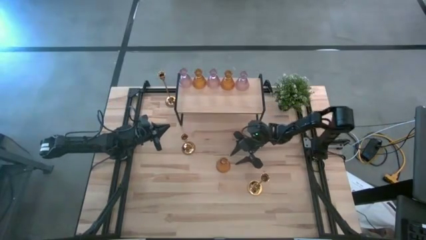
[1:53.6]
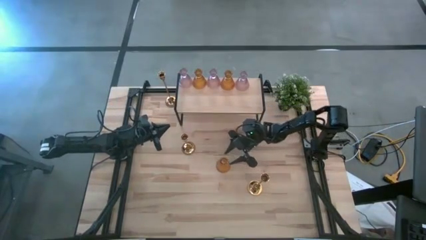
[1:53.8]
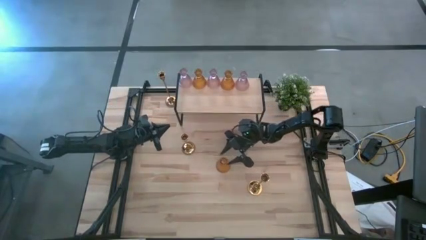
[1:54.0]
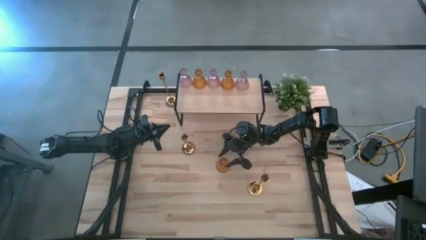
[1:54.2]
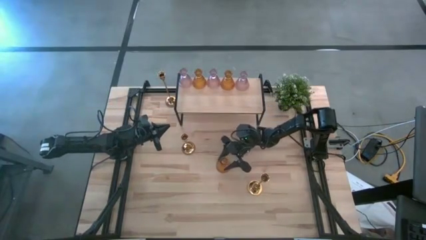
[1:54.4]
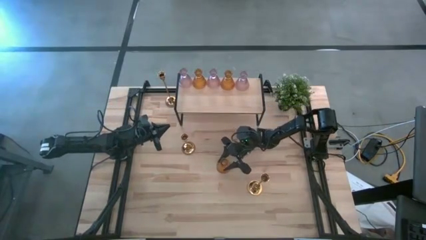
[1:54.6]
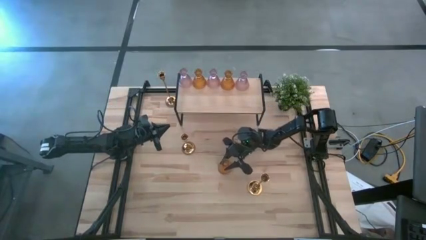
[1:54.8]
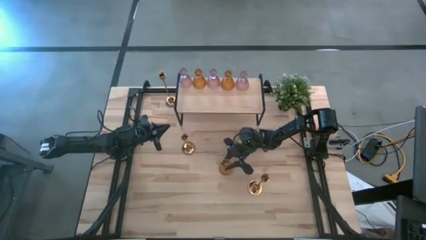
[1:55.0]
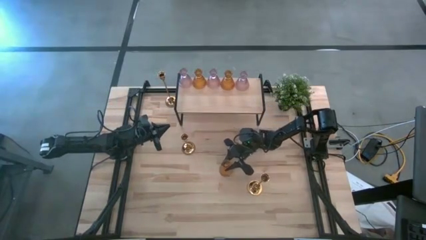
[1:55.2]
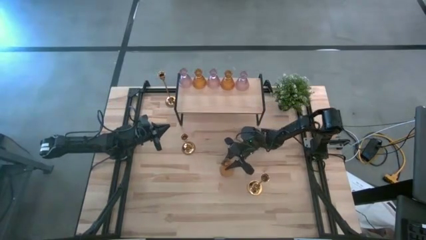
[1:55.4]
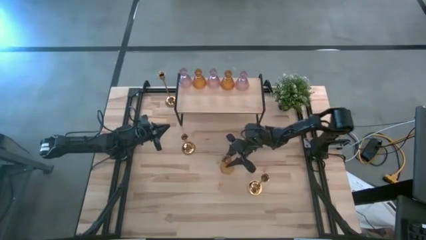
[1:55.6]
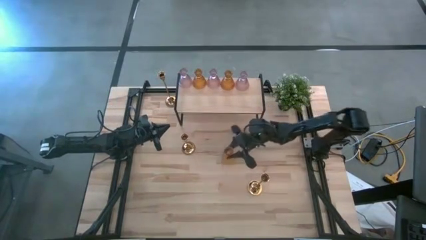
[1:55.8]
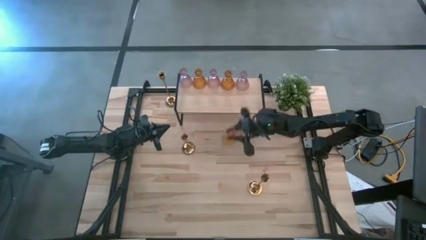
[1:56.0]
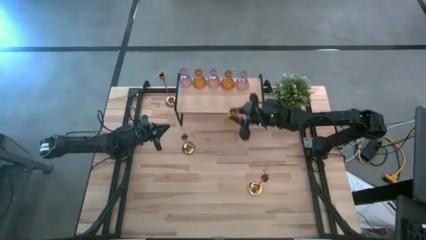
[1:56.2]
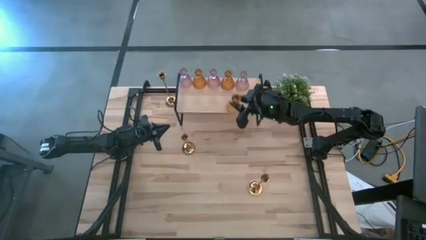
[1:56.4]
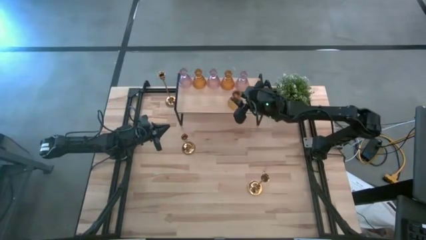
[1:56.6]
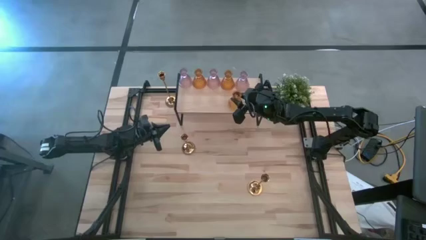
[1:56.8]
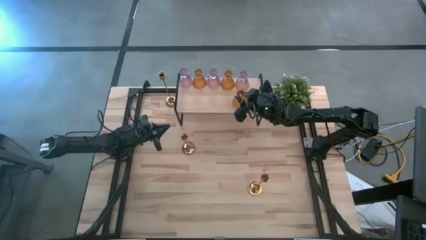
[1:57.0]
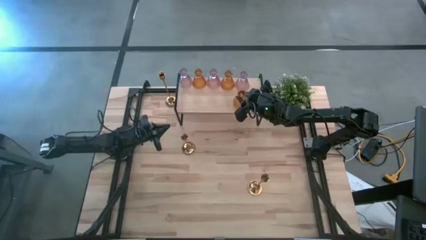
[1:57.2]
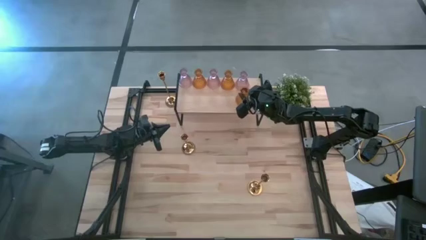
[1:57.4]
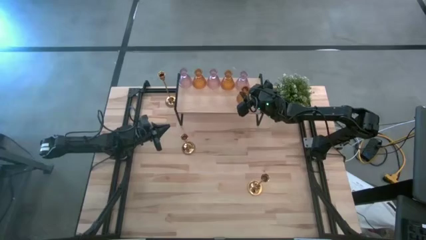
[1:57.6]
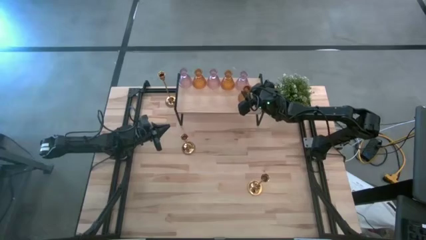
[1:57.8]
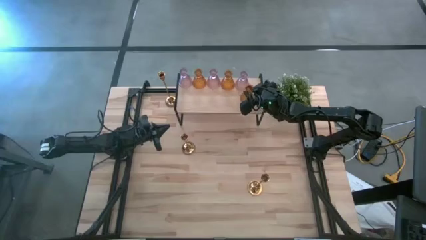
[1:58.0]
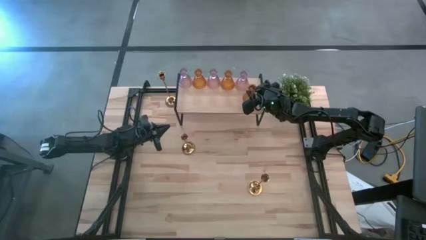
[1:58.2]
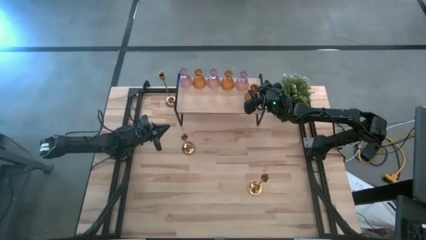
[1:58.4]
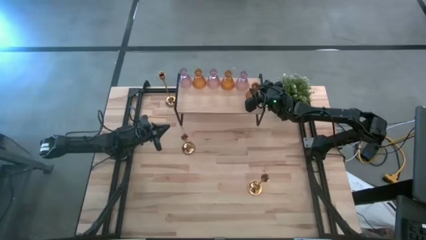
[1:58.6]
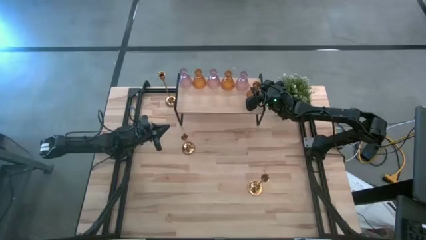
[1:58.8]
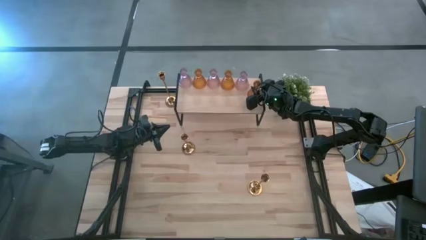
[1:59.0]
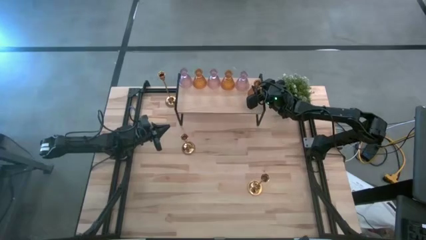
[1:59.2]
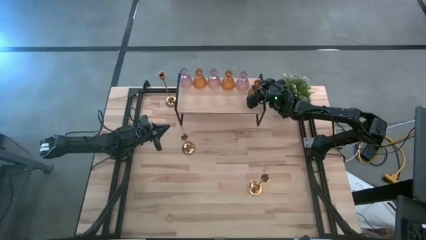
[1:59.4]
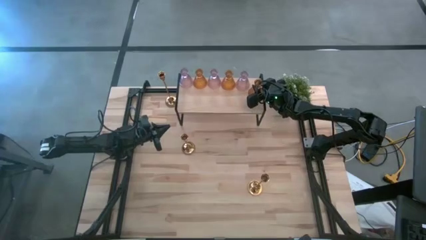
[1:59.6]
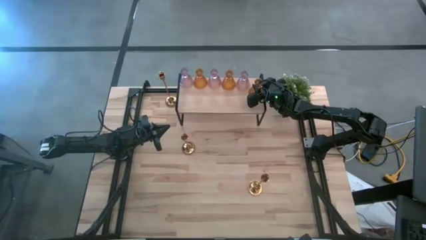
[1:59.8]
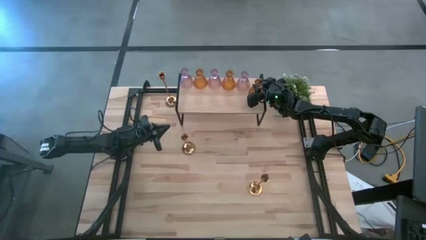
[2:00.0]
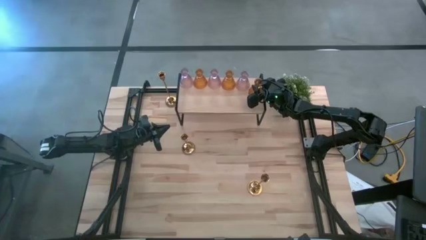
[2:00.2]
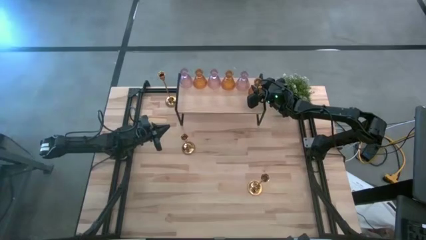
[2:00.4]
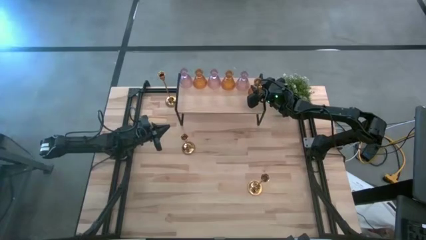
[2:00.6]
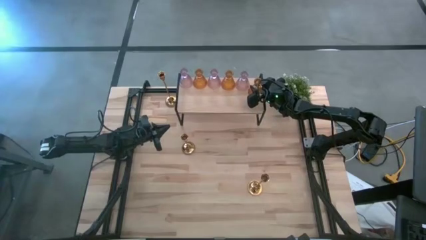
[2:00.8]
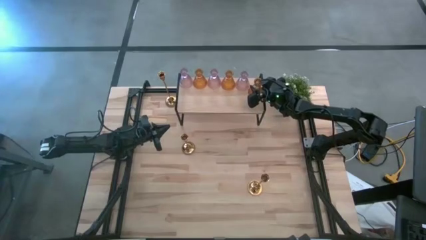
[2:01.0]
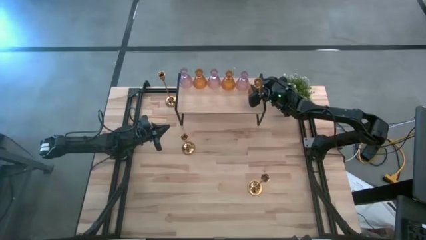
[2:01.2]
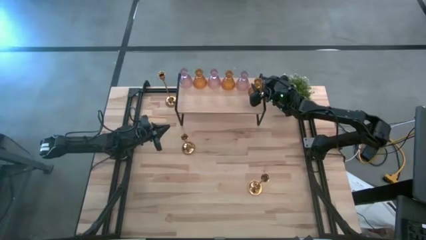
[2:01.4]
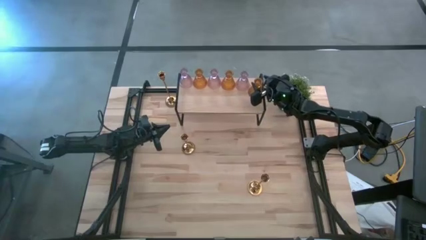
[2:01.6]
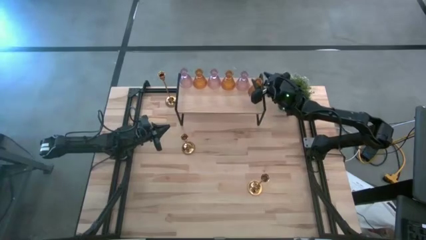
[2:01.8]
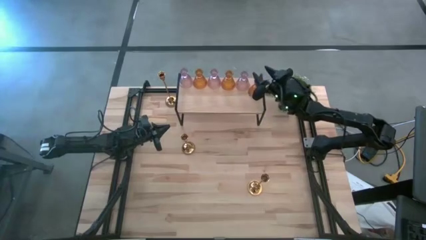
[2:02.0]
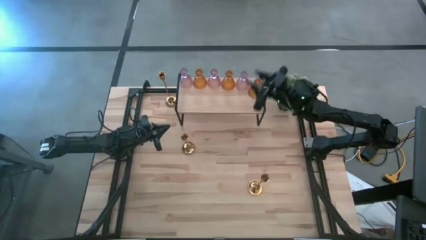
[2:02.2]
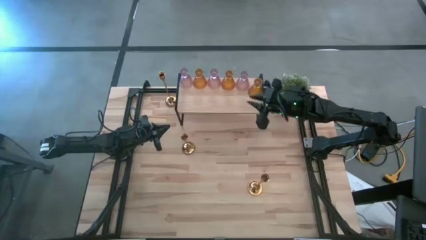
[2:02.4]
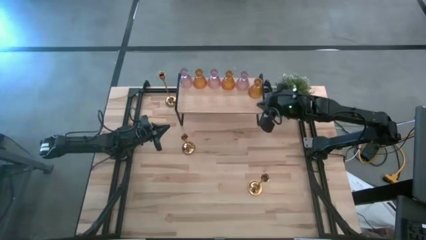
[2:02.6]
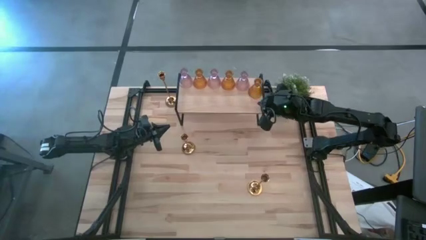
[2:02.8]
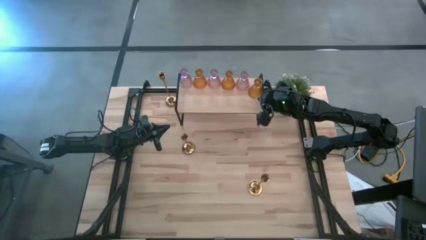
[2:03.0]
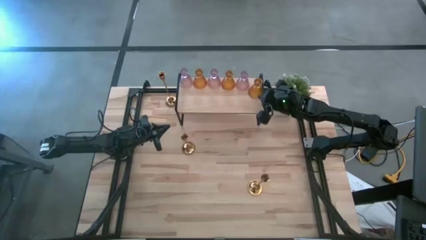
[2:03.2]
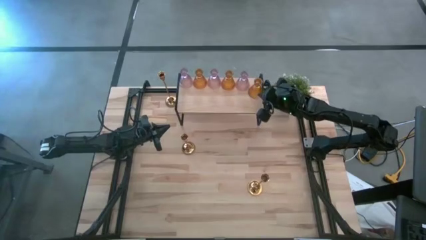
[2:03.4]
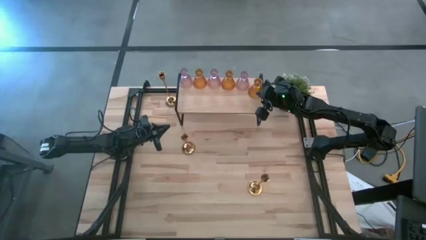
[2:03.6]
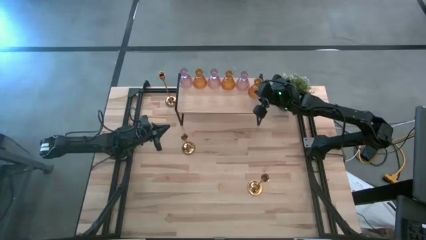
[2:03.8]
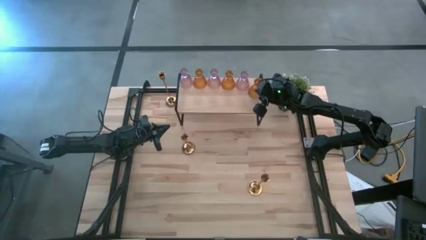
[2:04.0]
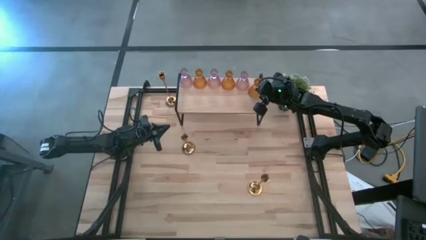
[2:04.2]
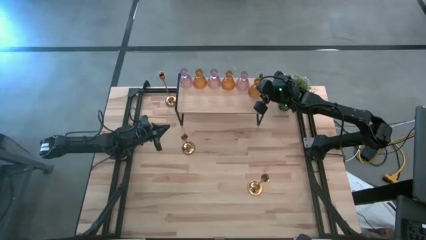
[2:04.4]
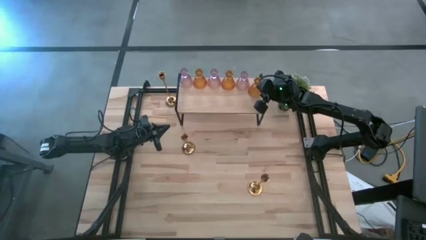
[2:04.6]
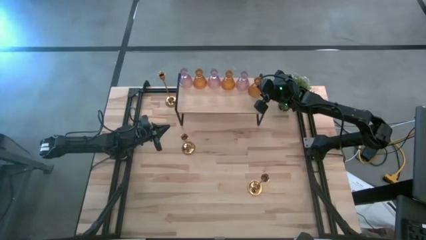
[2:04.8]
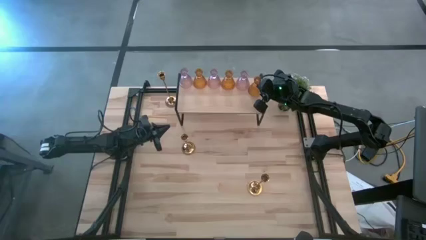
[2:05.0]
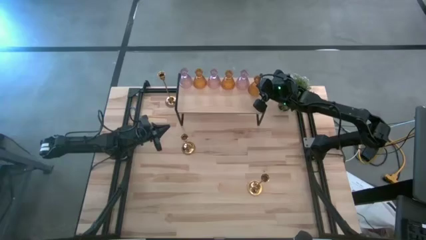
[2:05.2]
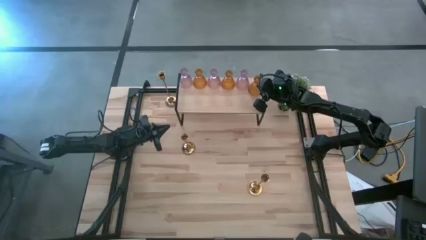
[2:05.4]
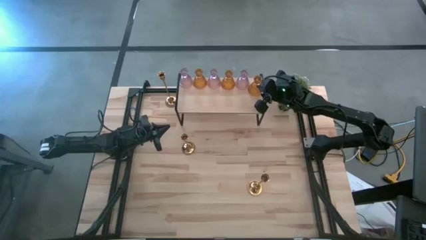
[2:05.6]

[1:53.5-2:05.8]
Task: Pick & Place candle stick holders
Put the yellow glass candle holder on the shelf aligned with the other glass candle holders

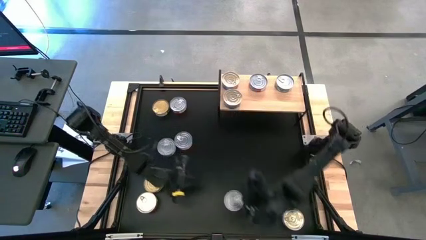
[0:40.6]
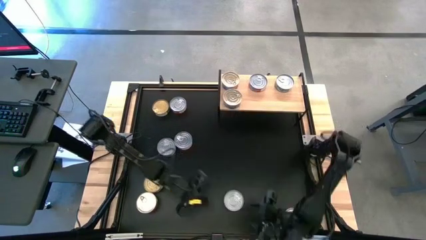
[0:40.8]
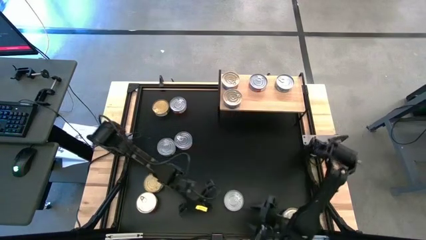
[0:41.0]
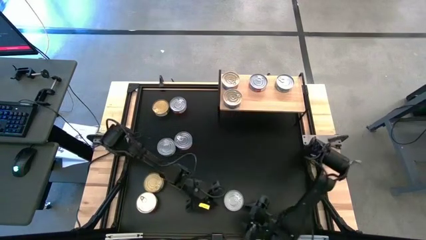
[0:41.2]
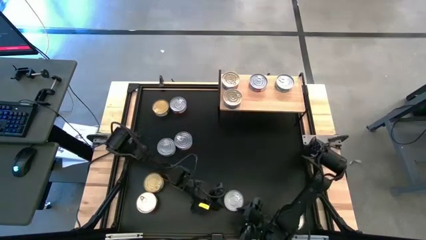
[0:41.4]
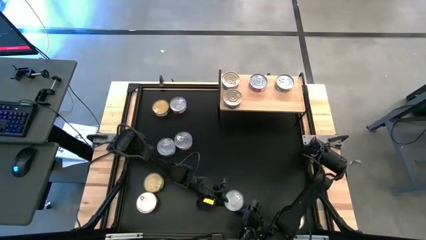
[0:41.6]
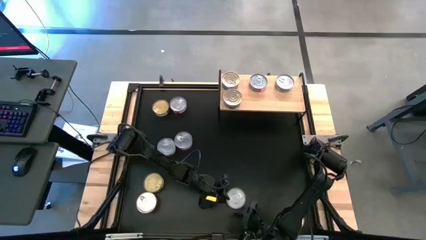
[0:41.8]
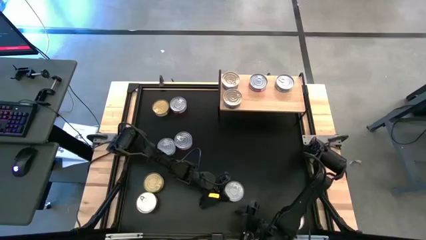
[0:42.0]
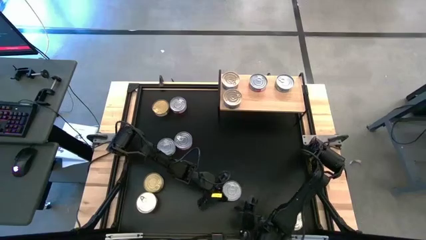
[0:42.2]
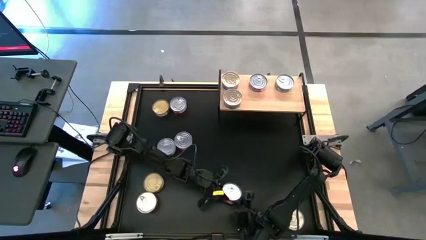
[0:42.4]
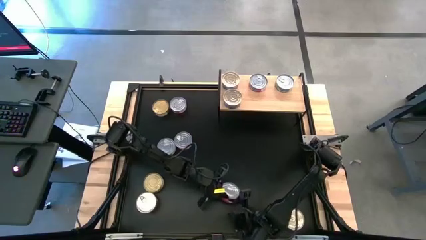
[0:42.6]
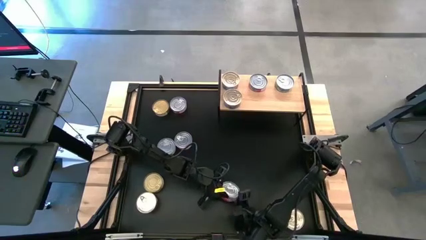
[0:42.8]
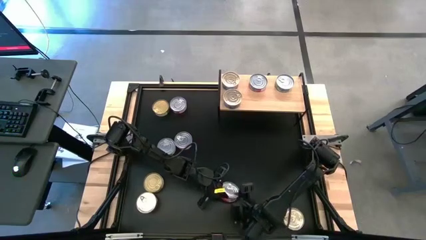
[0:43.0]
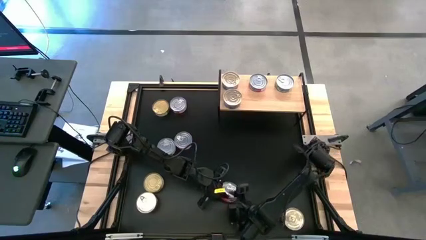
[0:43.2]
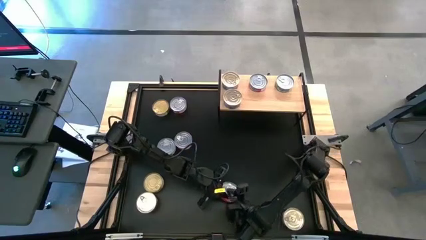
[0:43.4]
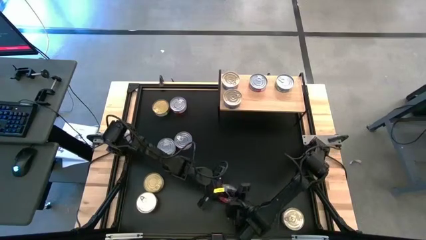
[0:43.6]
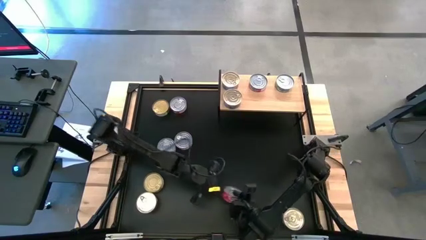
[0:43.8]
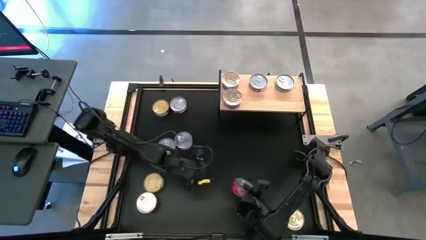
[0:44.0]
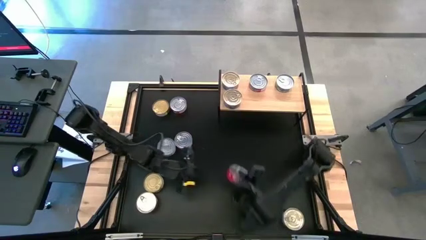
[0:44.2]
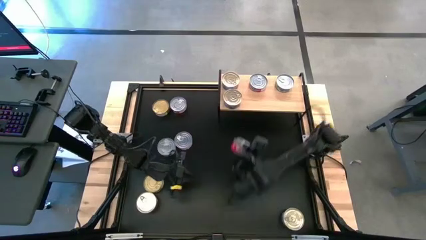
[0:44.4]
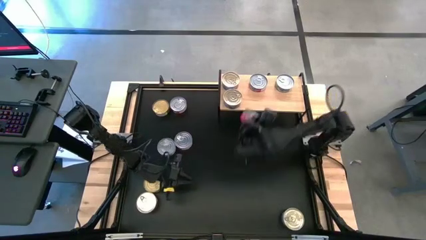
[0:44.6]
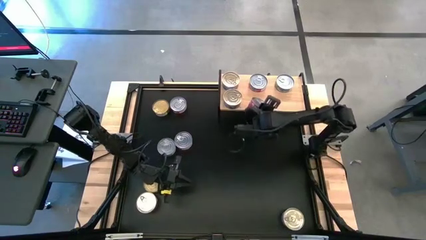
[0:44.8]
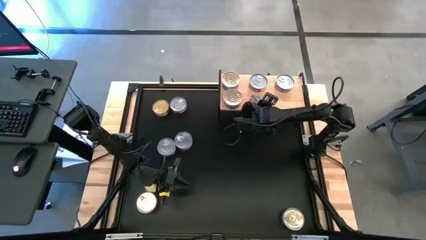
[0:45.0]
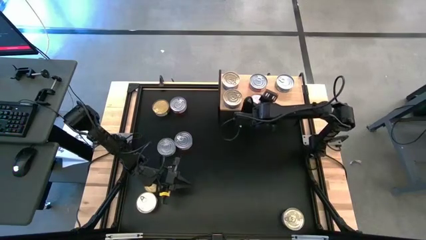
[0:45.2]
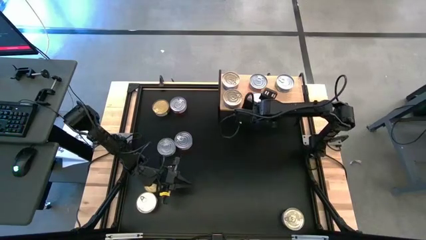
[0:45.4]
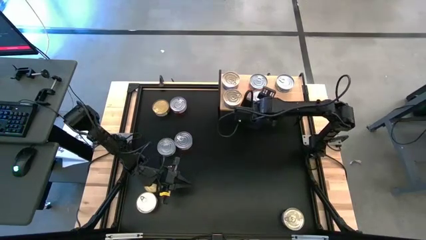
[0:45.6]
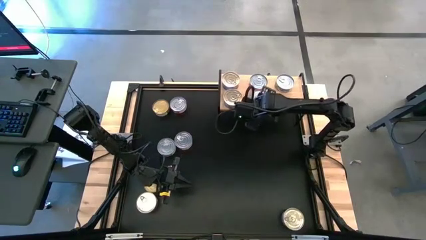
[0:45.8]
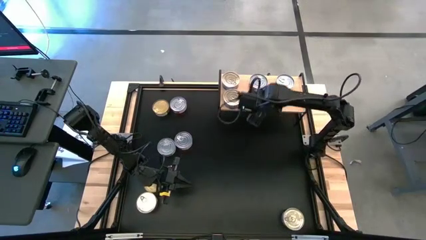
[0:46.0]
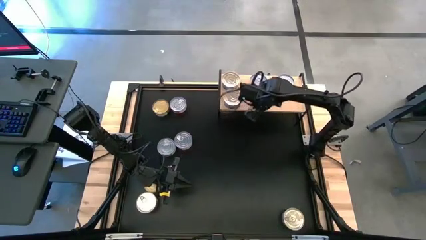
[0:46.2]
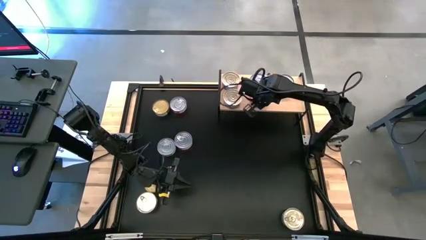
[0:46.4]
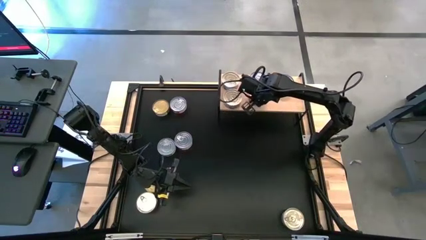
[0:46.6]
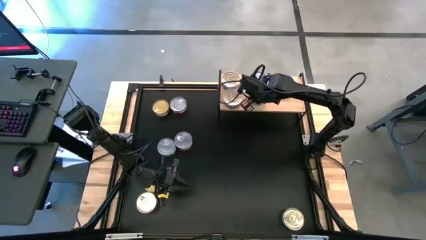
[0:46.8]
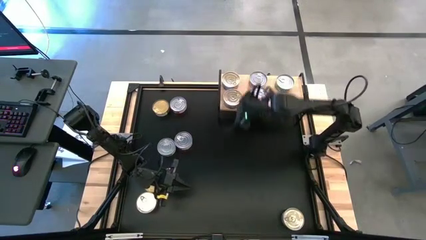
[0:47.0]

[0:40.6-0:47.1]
Task: Stack canned seafood by type on shelf
Put the red tuna can on the shelf aligned with other red tuna can
